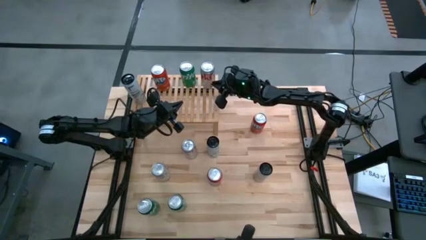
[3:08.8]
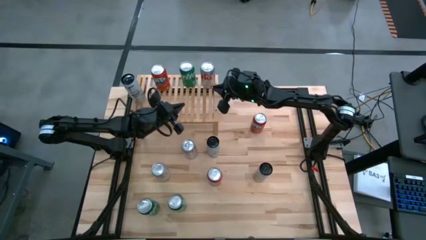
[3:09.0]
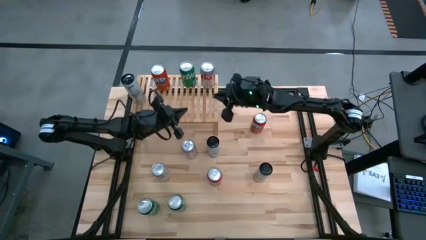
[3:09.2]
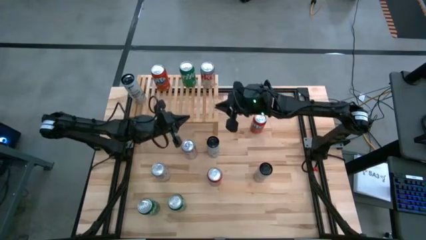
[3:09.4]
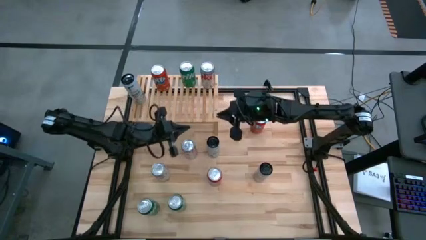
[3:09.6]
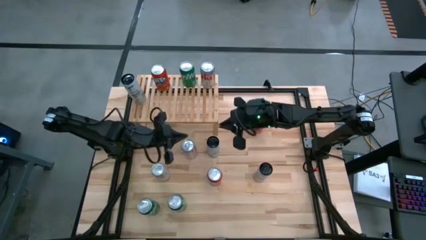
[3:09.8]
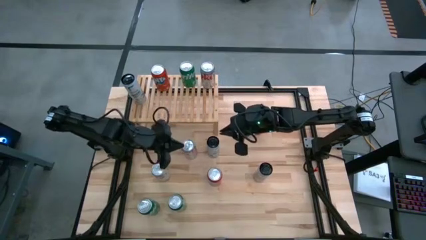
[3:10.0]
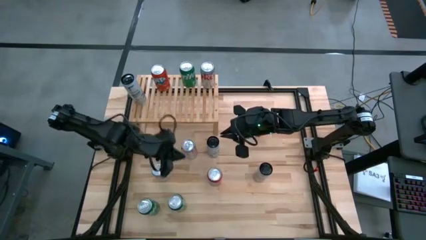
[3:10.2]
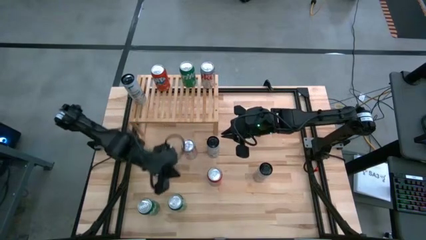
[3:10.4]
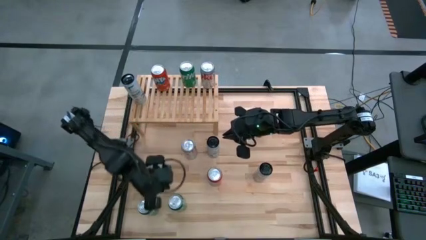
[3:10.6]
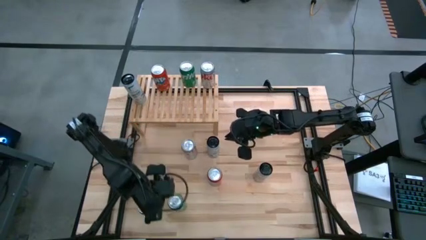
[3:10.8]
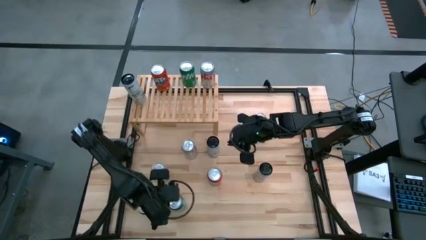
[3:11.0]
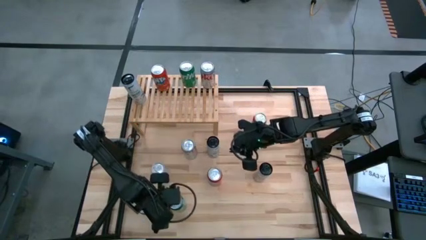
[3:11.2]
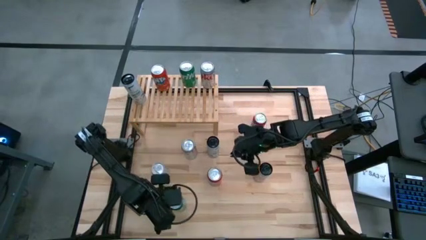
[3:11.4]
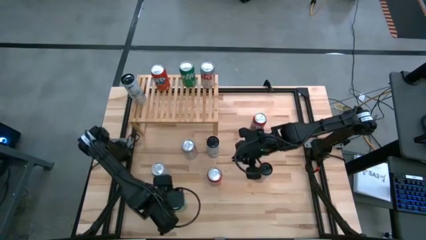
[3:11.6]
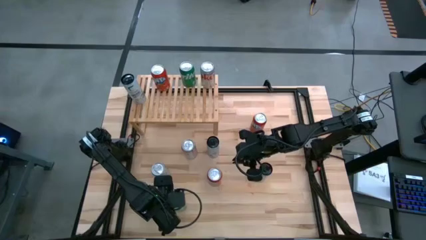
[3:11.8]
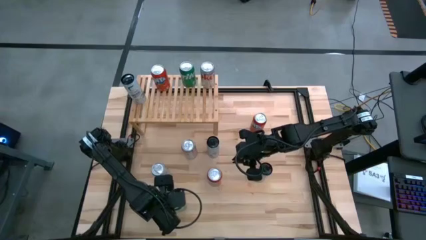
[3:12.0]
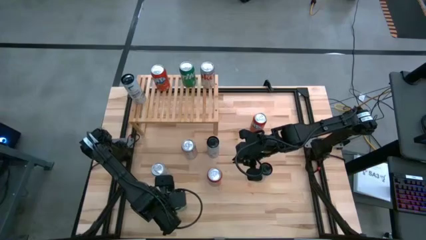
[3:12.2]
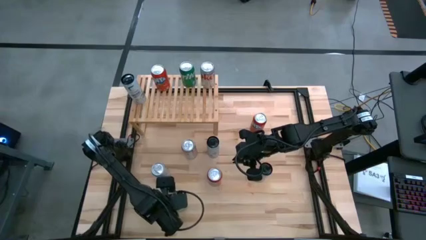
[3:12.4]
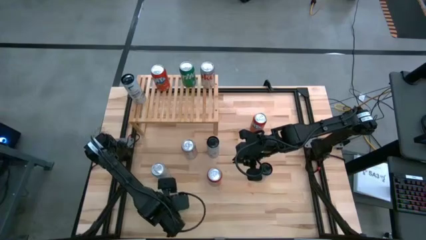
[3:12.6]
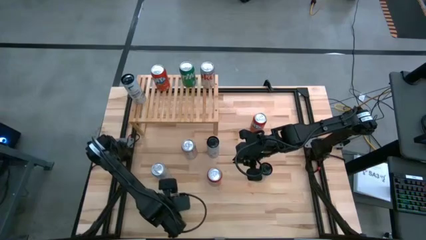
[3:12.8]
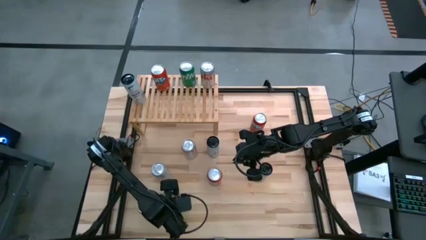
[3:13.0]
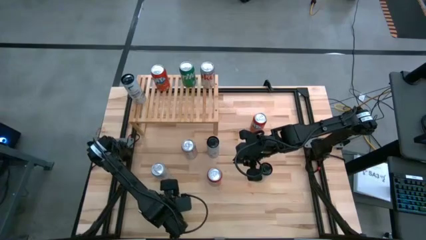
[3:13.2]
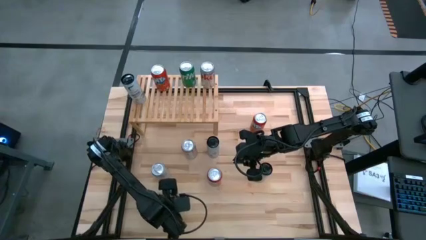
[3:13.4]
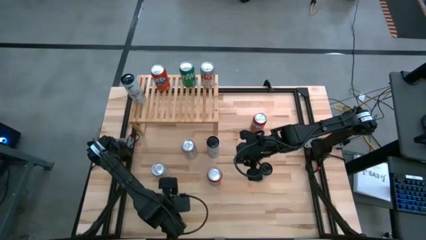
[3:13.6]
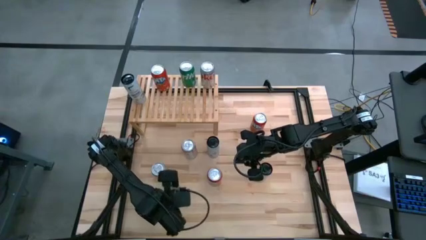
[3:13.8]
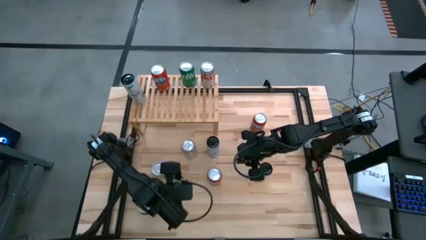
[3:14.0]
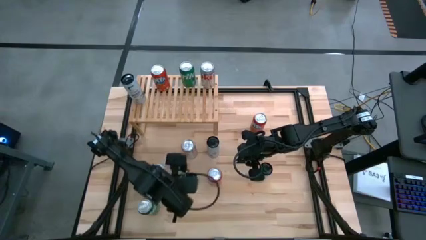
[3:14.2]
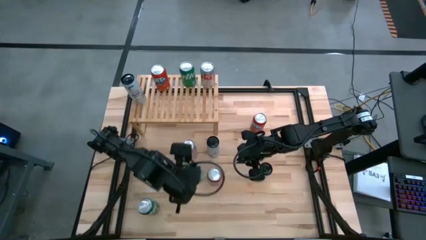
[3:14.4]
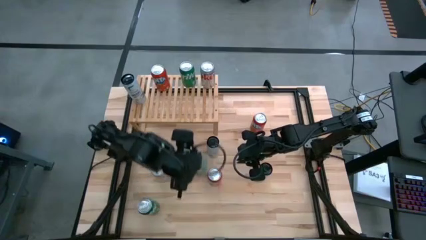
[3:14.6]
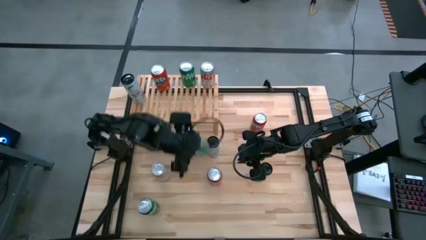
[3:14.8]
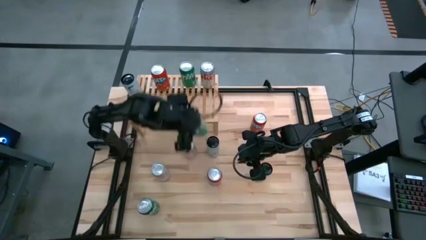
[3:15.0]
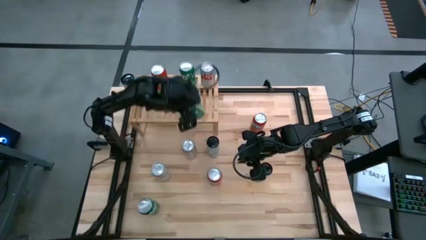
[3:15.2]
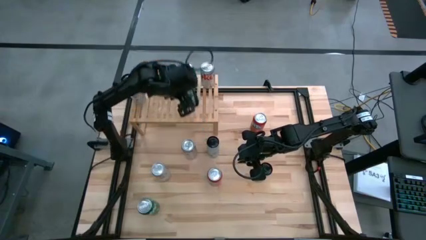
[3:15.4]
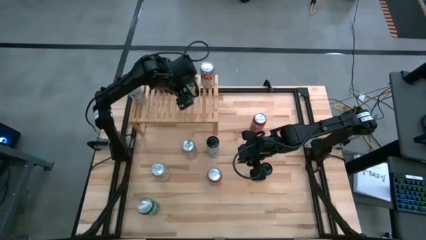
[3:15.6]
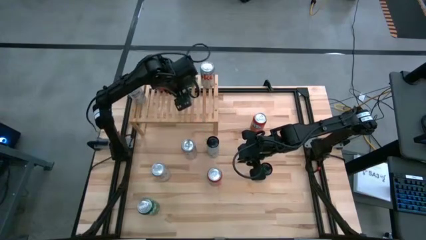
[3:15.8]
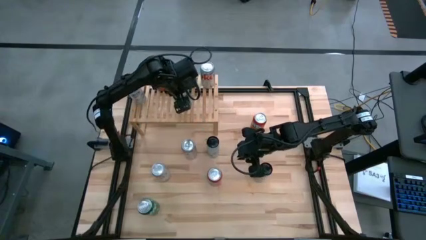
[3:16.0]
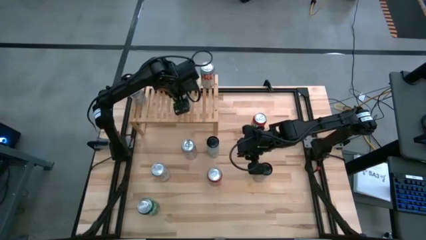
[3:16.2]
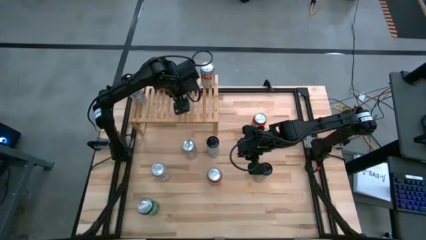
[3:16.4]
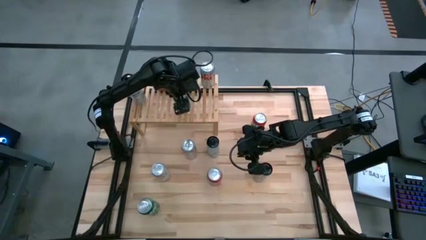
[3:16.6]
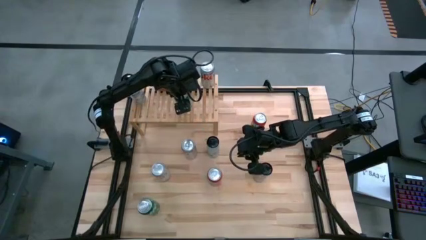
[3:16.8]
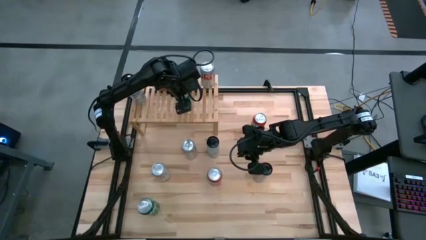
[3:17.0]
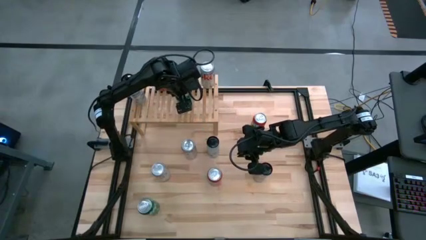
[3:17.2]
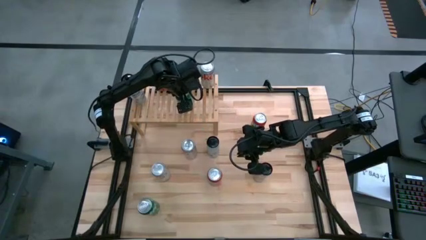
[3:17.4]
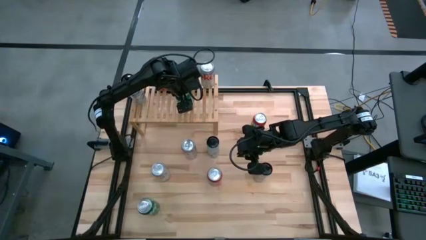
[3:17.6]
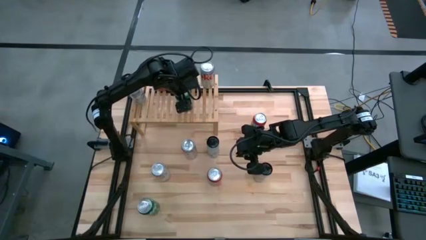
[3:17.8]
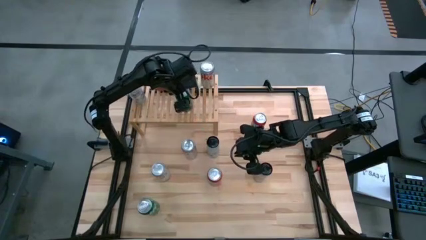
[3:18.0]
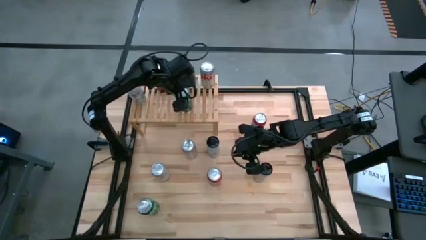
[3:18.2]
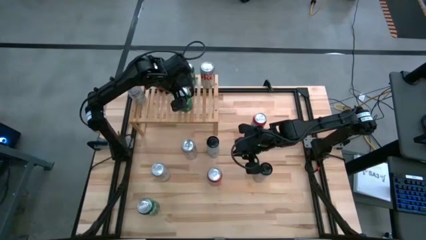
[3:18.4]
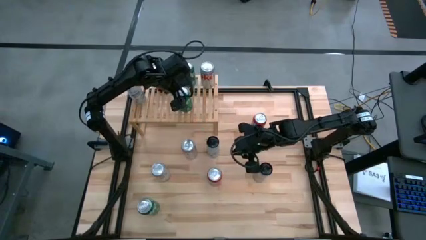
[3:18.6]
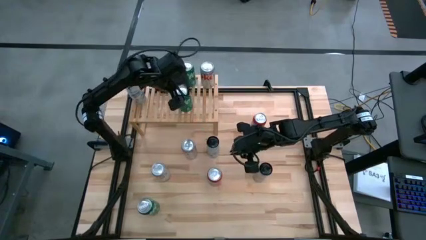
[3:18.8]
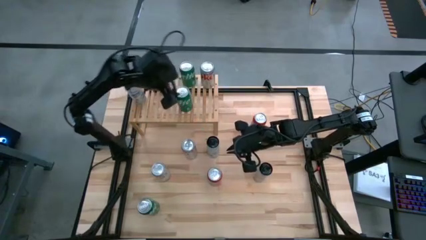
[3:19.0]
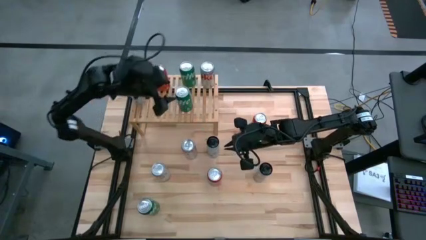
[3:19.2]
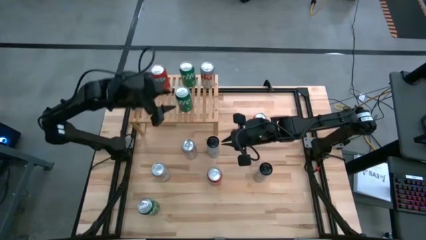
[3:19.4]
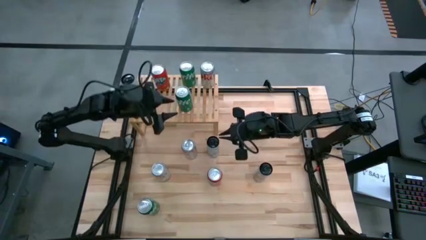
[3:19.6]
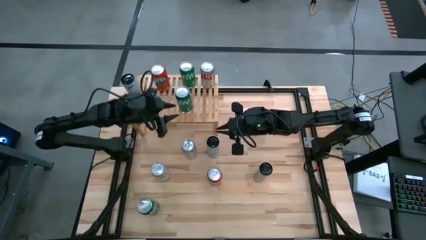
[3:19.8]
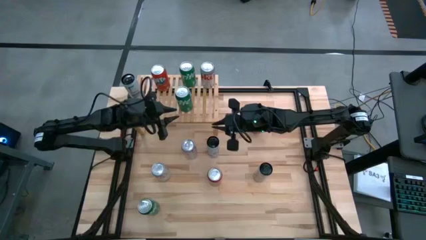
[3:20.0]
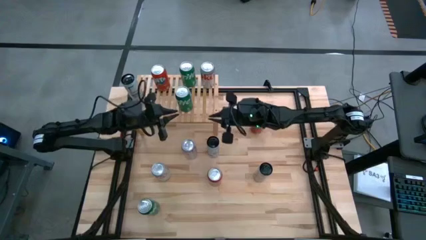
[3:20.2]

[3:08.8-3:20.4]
Task: Place canned beverage on shelf
Put the right green soda can on the shelf aligned with the other green soda can

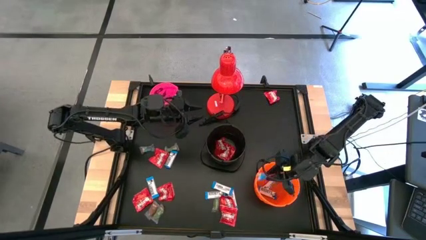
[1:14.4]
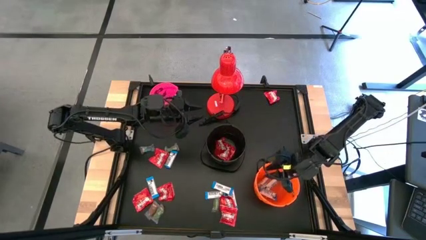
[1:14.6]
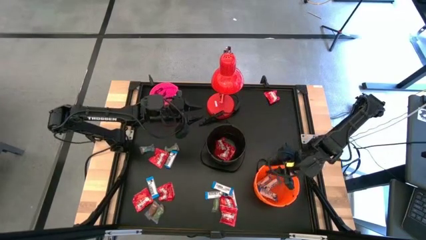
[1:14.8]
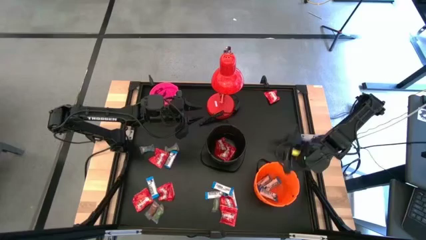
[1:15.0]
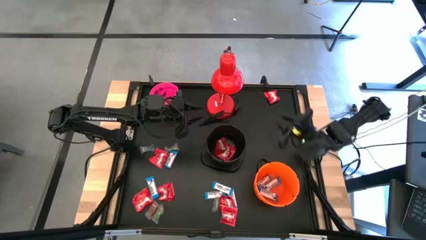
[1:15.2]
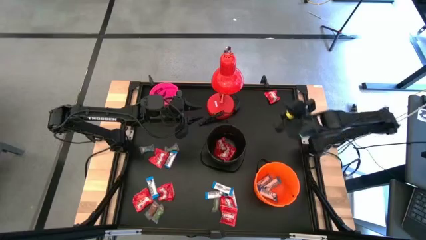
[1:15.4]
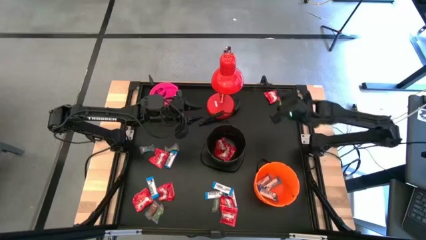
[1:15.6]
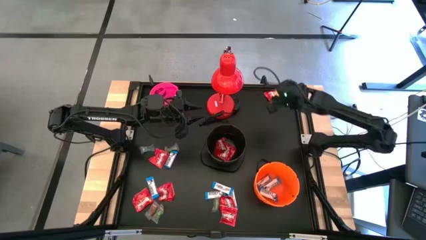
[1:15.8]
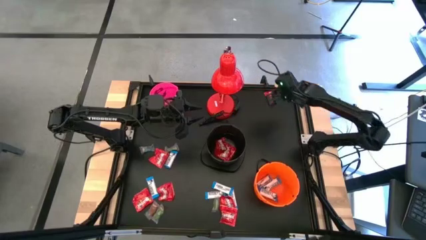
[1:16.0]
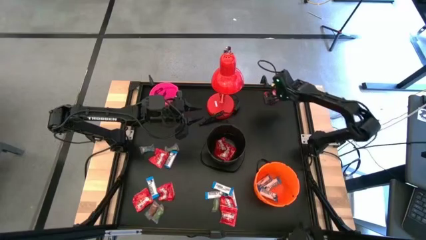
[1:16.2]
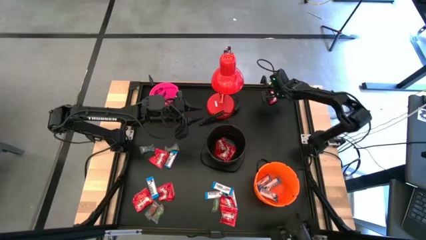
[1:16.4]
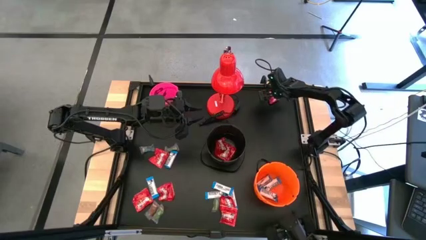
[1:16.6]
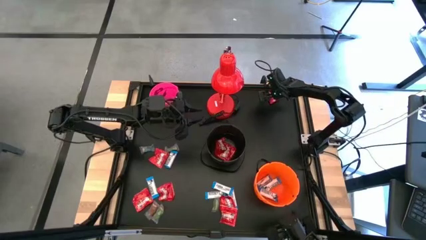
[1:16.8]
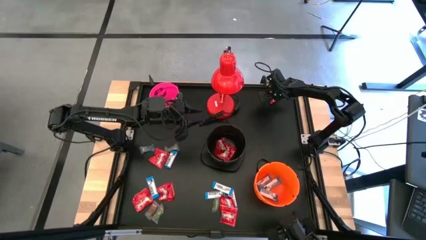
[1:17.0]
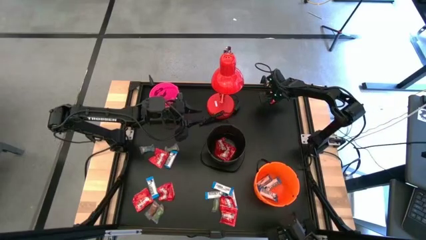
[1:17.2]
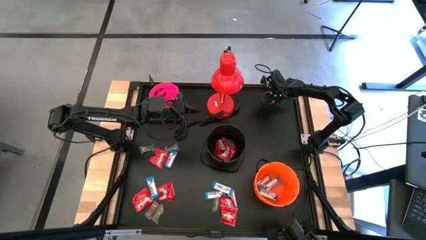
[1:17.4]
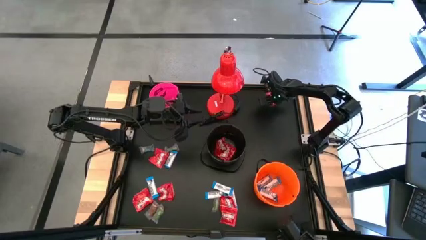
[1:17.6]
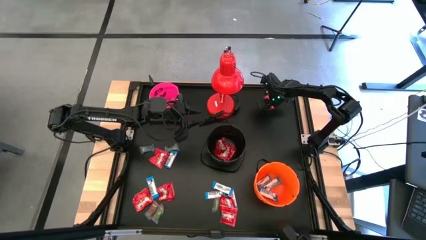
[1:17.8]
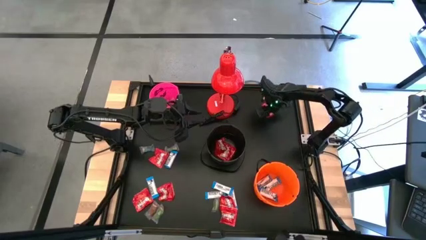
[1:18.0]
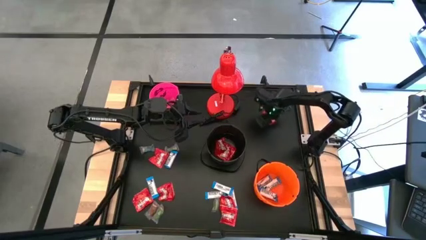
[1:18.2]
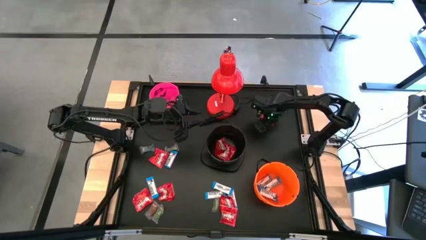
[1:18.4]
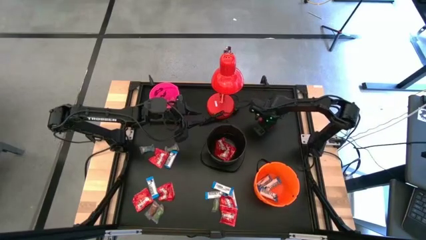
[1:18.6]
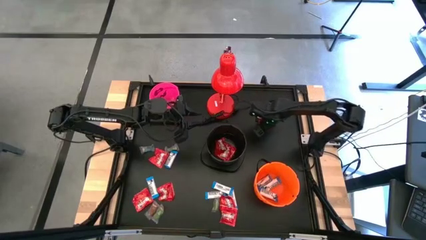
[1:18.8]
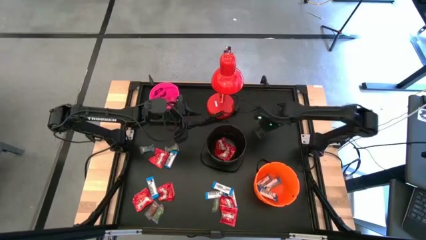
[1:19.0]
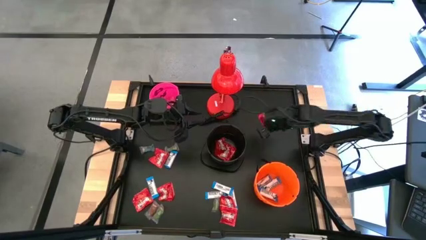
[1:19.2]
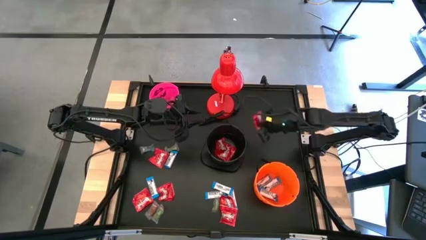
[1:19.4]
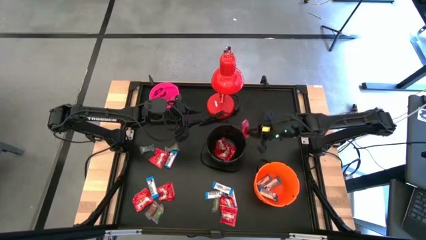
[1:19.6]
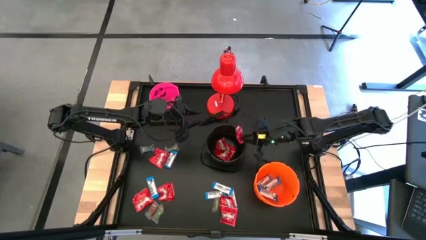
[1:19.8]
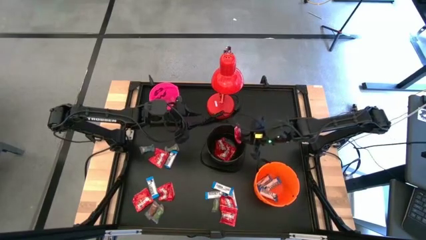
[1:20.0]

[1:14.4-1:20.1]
Task: Organize candy in baskets
Put the red candy into the black bucket
